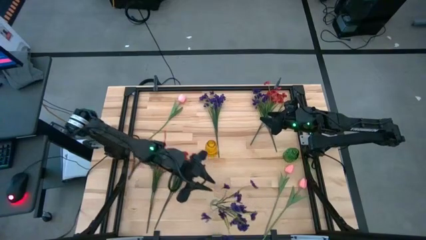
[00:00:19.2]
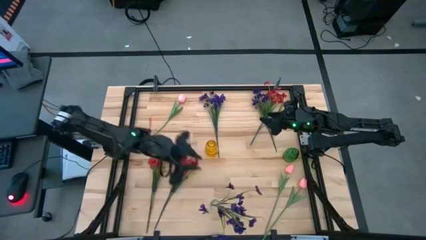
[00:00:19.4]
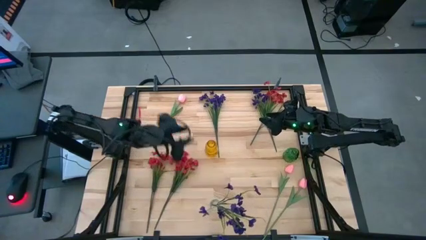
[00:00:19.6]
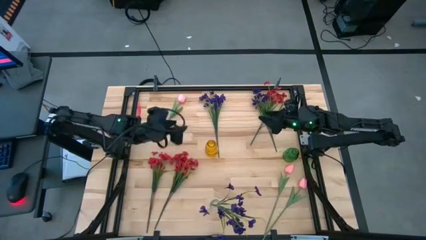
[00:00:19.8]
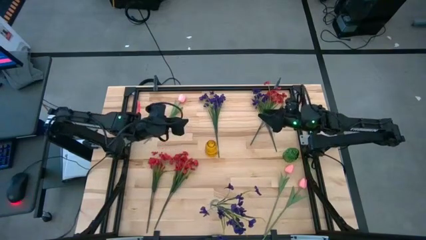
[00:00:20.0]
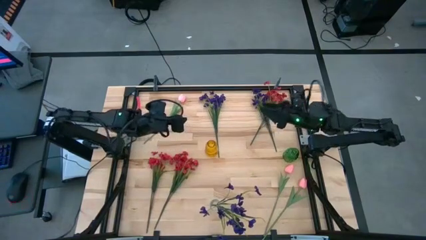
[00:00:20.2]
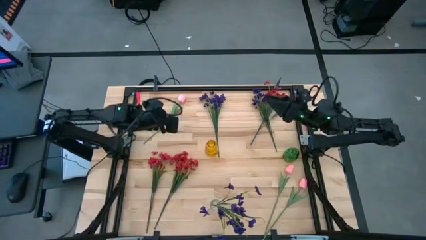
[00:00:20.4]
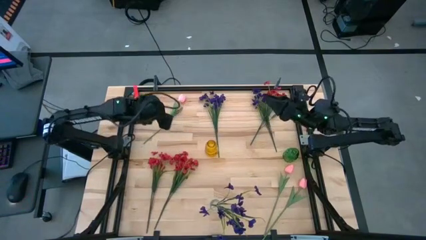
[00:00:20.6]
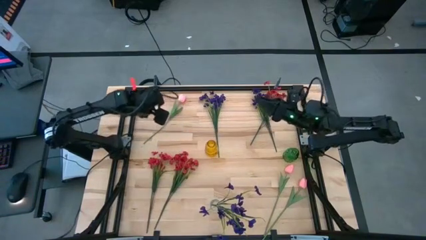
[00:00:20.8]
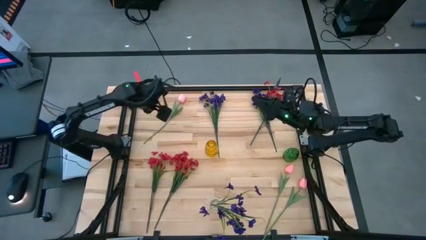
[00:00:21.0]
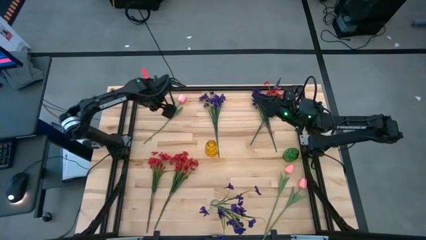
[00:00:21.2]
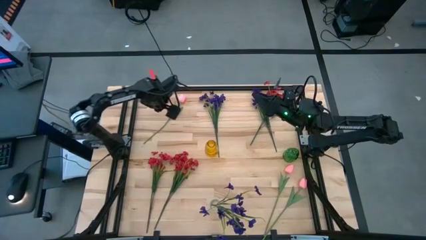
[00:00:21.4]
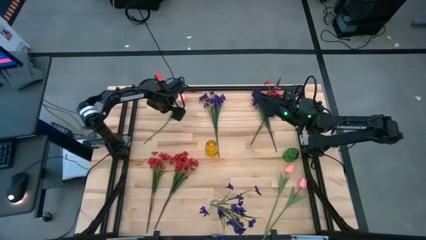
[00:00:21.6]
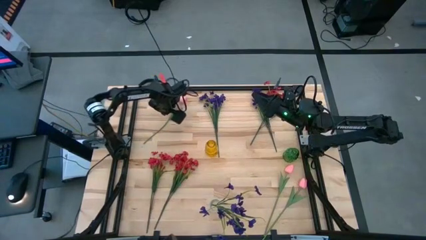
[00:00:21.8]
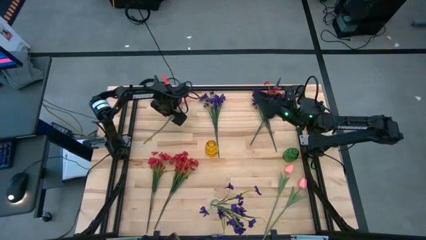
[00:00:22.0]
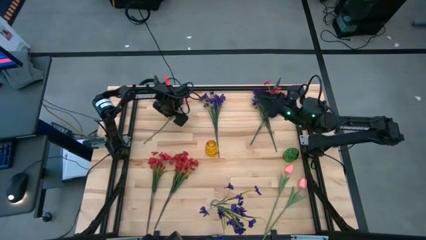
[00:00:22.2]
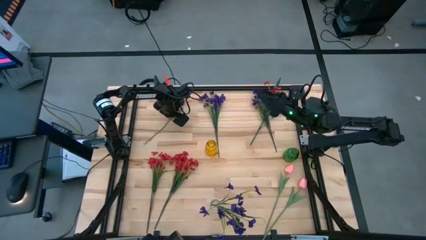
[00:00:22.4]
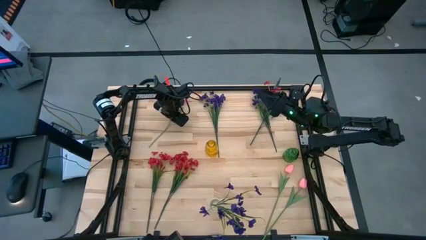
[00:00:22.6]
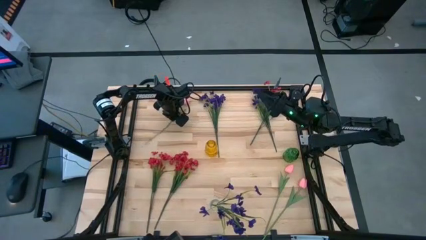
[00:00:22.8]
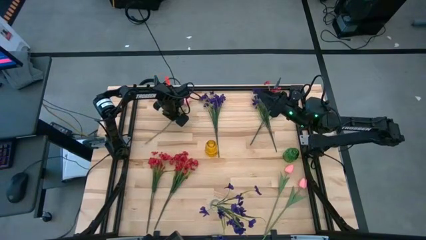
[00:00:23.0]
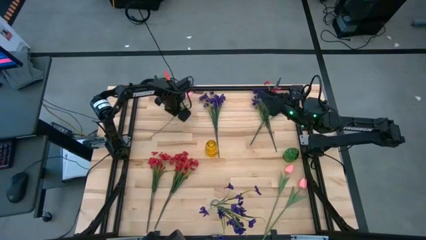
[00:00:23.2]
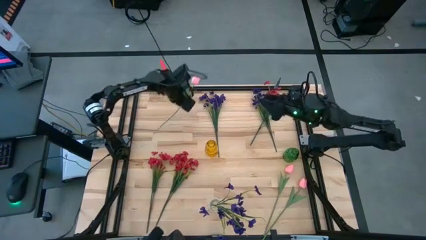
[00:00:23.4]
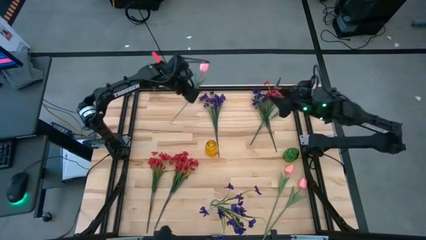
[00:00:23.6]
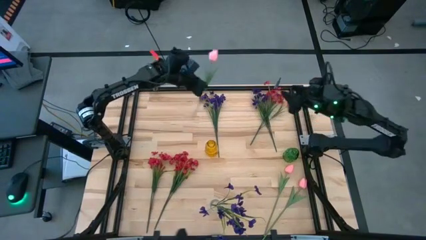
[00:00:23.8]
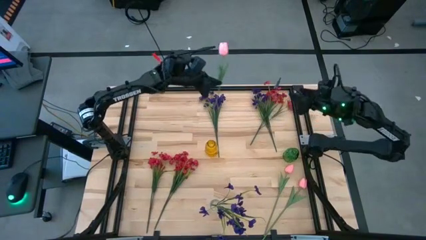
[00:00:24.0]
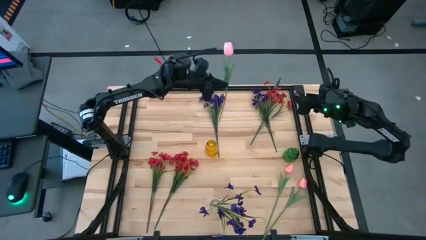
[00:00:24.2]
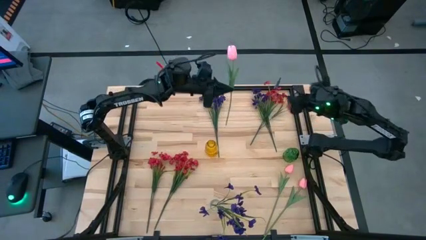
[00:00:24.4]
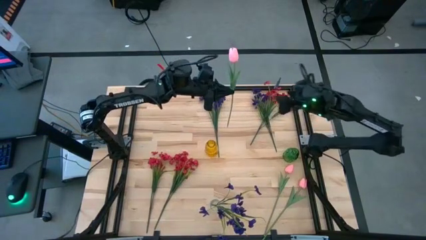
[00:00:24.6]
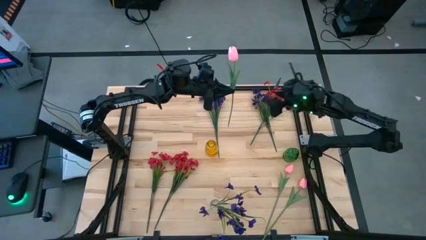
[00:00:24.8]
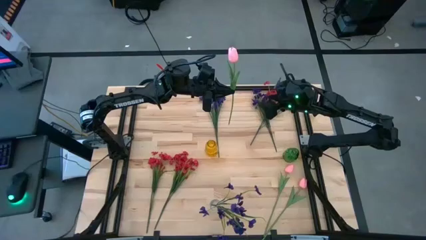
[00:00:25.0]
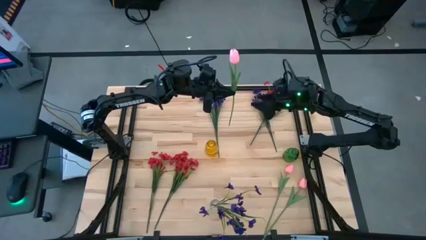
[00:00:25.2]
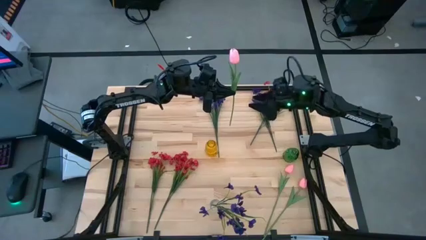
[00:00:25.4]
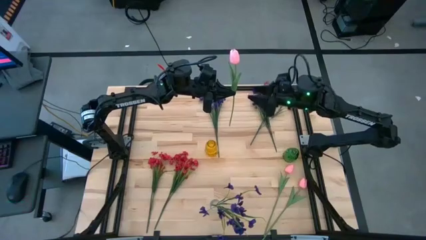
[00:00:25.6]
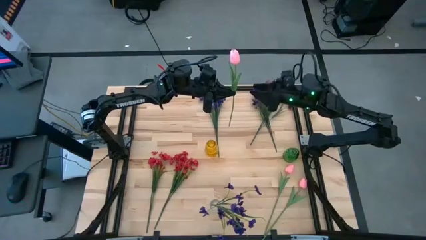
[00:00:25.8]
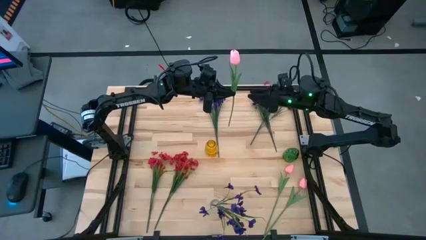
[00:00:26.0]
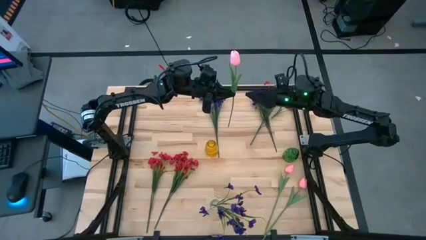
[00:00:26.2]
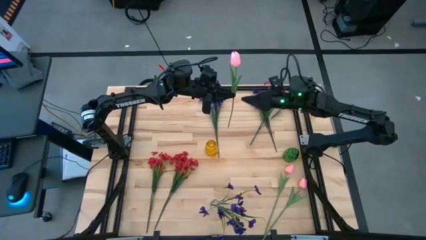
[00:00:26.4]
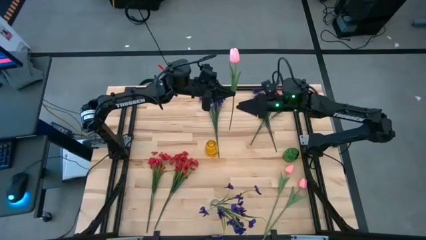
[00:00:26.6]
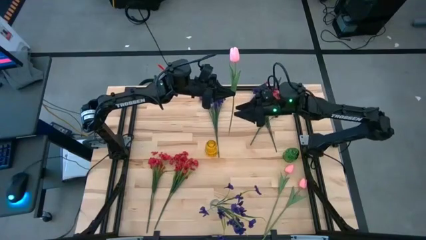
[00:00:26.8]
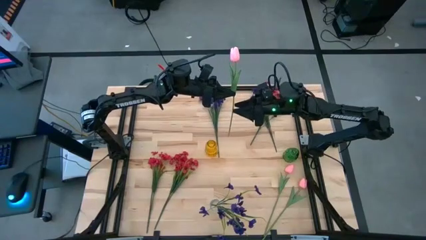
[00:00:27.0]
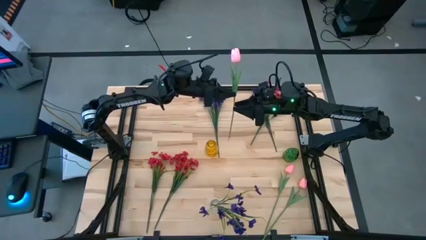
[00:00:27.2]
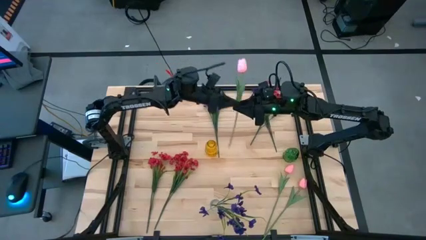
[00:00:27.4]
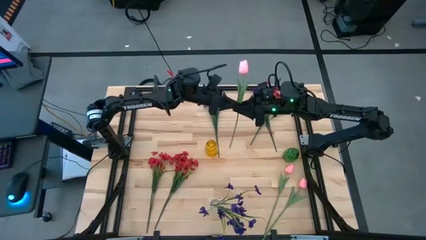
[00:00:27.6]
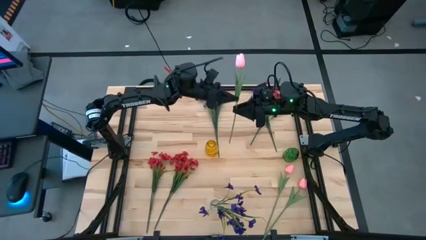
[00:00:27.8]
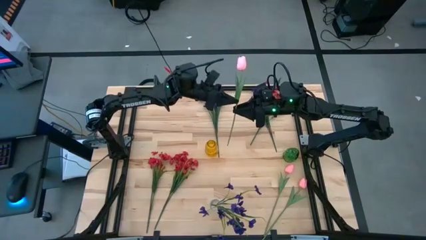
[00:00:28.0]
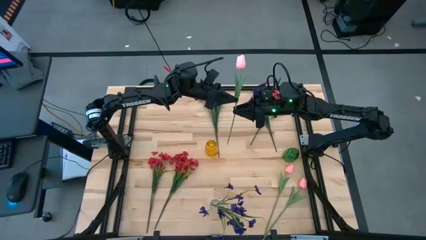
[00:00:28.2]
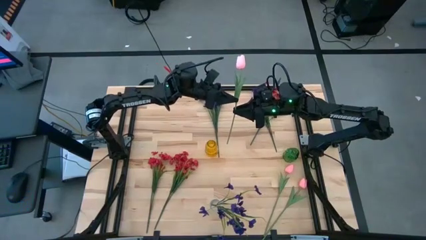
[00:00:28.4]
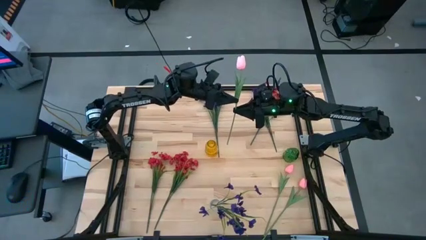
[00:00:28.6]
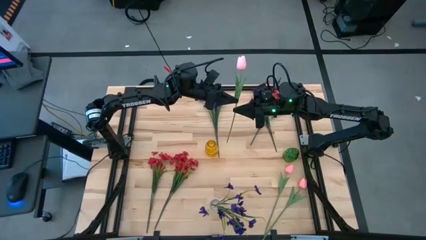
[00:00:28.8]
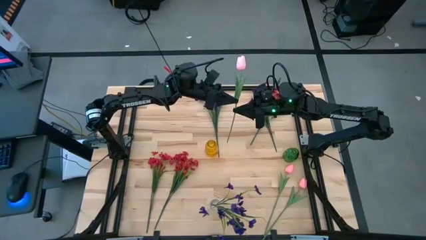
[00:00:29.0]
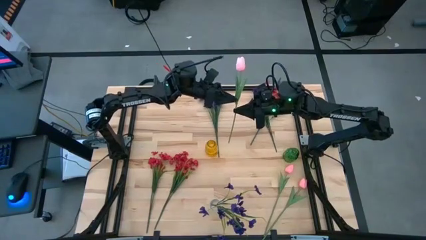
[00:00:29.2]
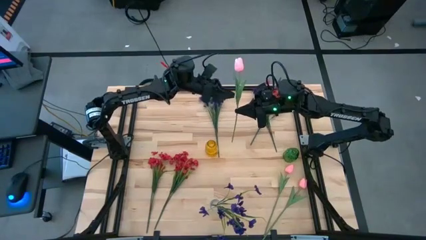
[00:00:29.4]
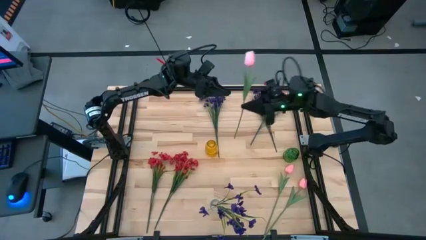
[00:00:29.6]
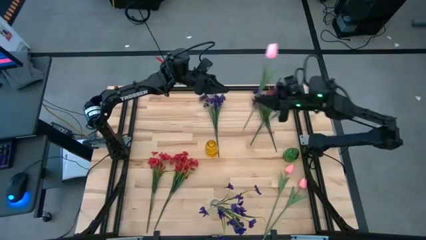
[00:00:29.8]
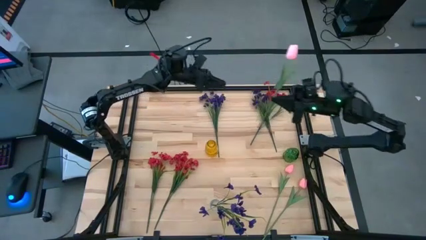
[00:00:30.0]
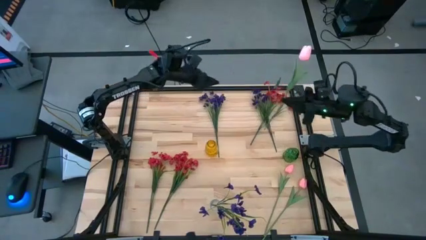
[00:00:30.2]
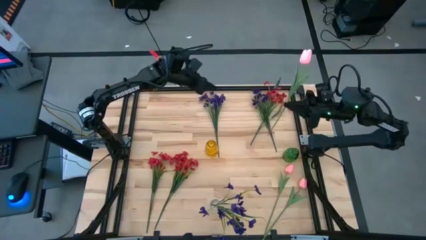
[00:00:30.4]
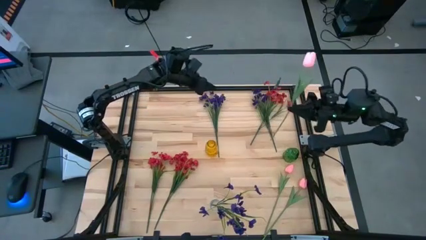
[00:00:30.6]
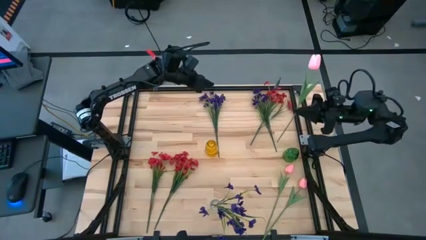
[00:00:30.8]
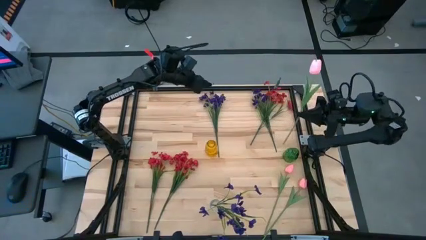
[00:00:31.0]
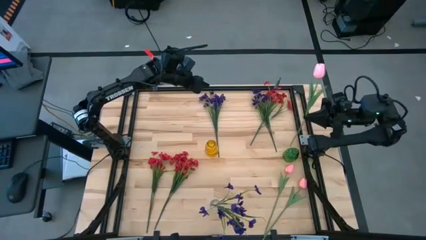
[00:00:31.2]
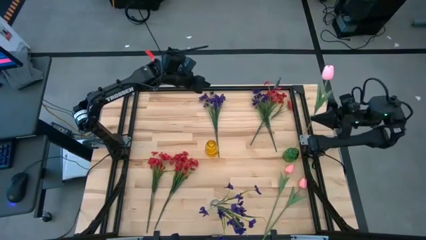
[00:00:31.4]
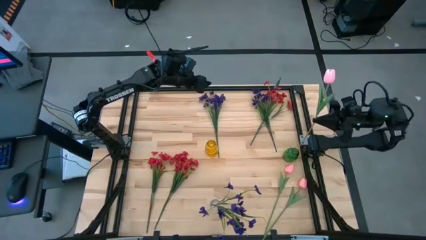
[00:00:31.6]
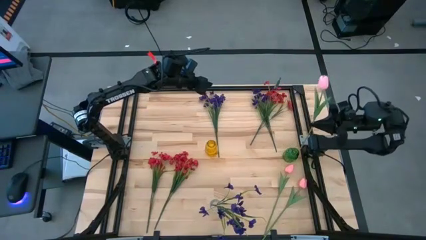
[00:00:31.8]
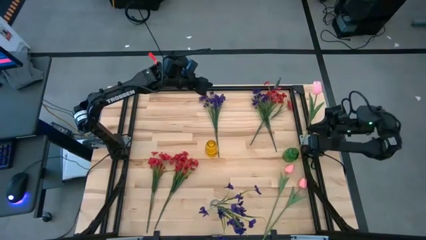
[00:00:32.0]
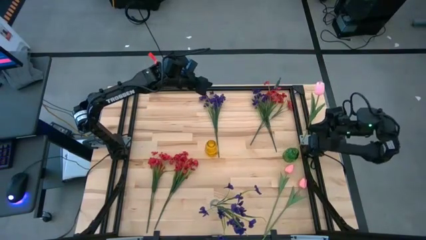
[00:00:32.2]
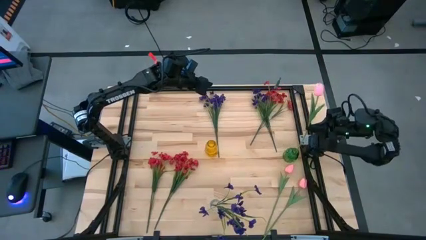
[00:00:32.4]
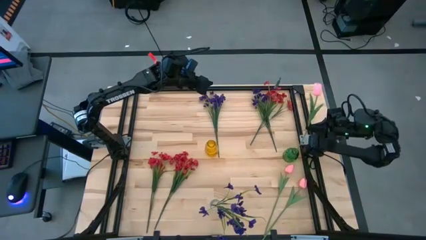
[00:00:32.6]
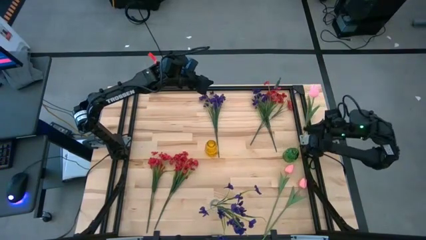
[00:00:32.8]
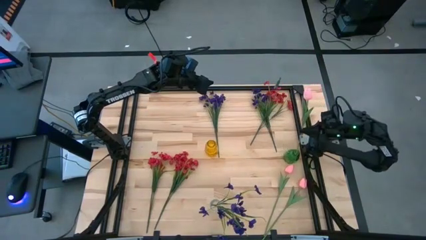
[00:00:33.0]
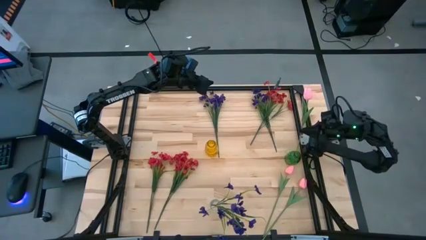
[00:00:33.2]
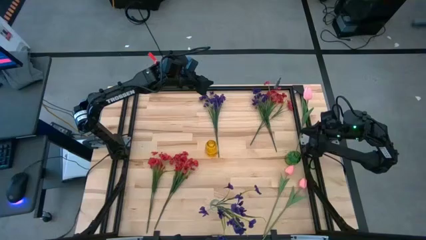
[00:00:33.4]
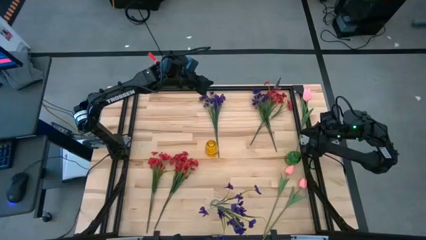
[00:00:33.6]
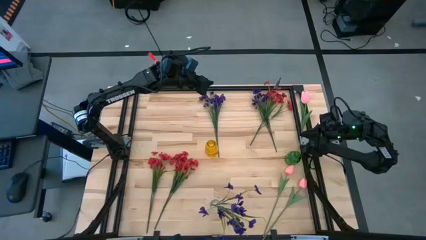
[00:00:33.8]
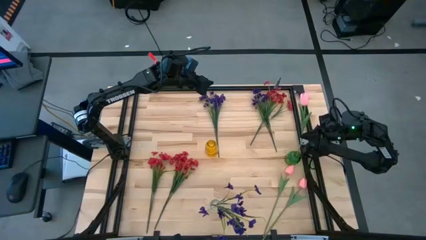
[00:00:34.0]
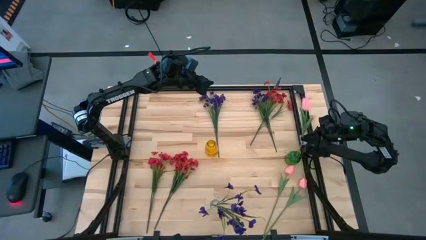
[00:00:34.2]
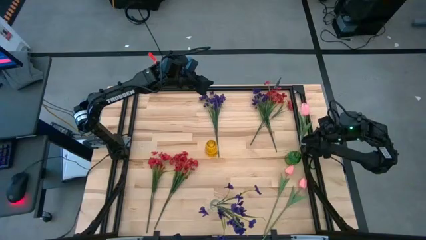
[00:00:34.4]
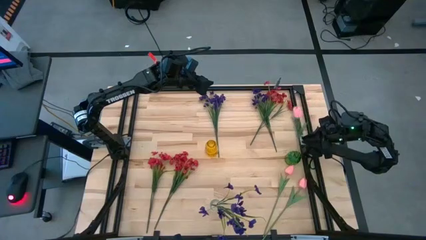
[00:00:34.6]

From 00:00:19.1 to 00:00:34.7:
Task: Sort flowers into vase by color
Put the top pink tulip into the green vase
